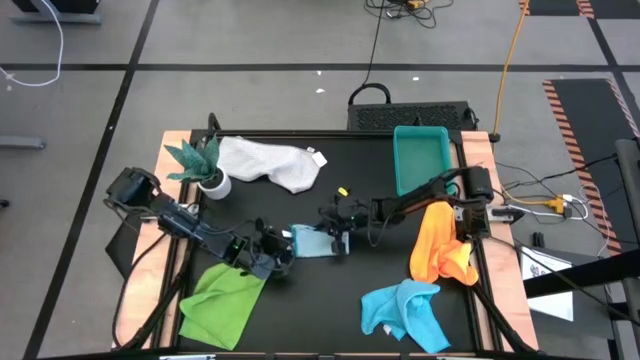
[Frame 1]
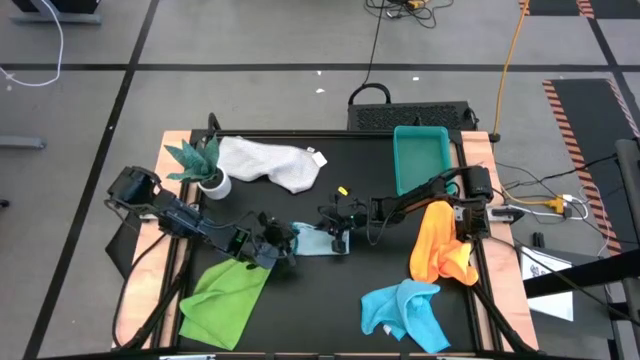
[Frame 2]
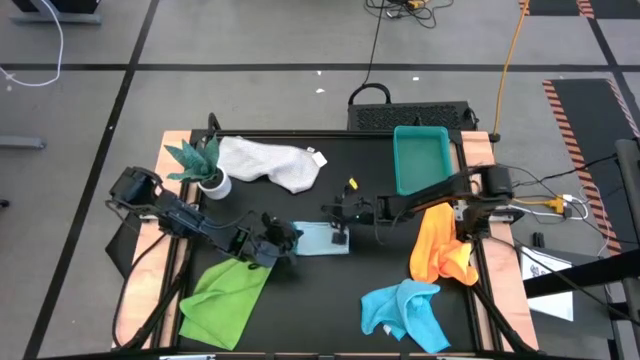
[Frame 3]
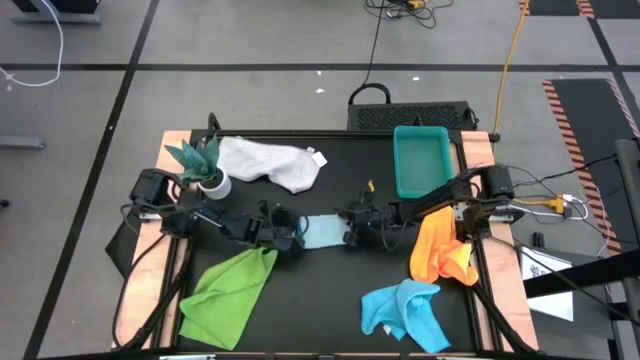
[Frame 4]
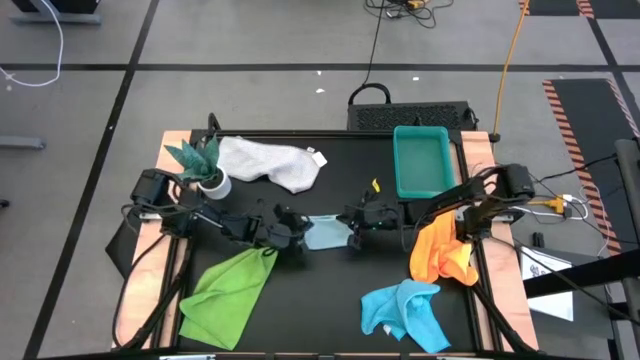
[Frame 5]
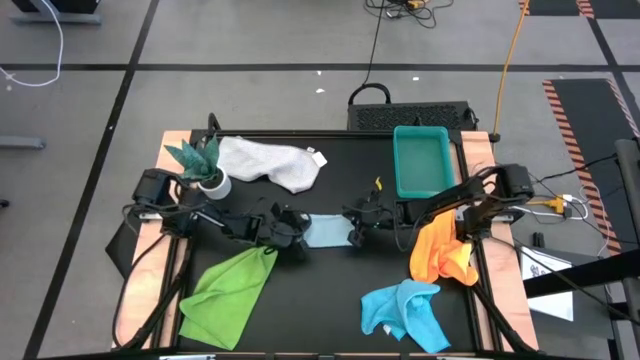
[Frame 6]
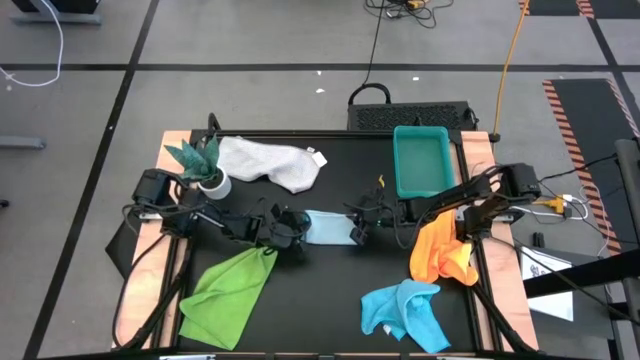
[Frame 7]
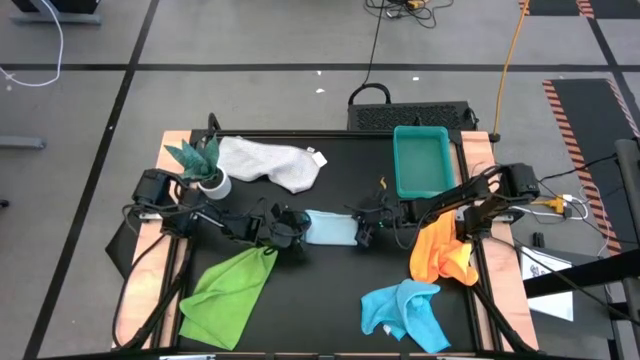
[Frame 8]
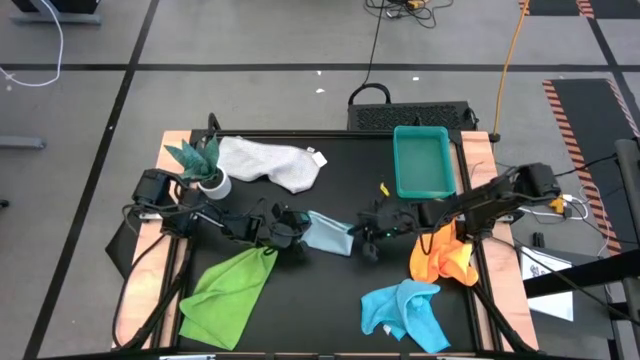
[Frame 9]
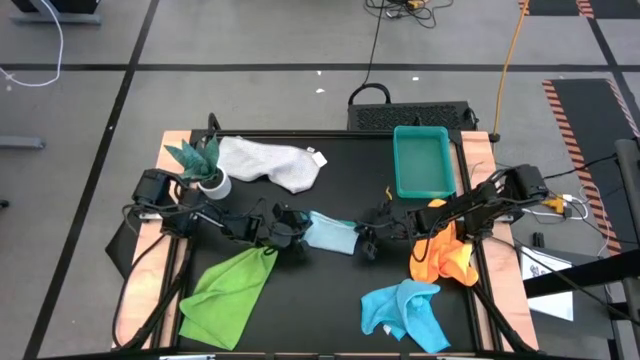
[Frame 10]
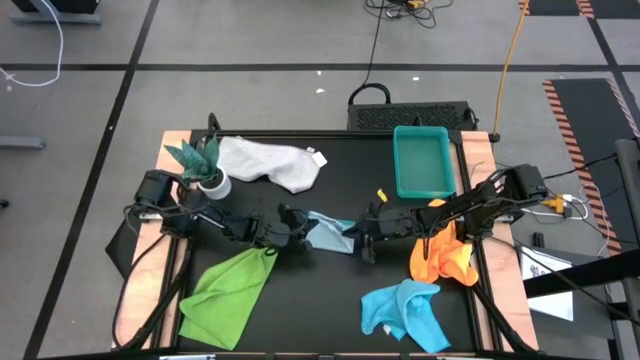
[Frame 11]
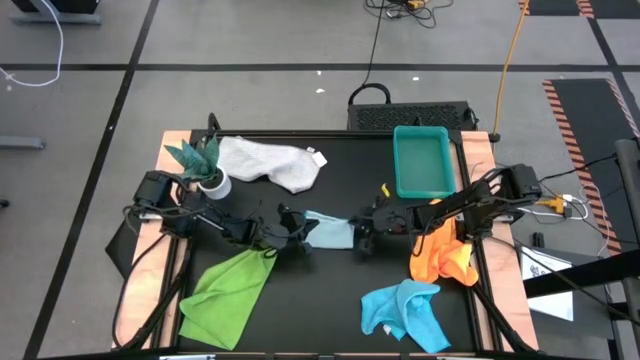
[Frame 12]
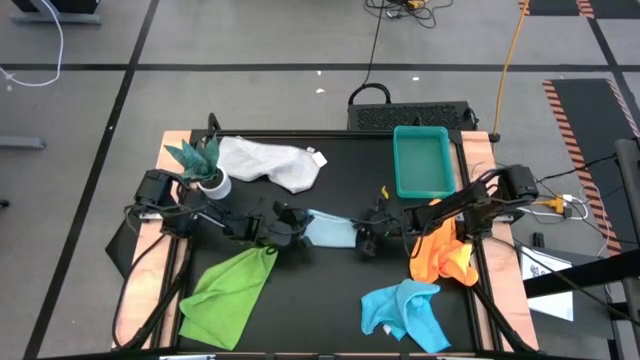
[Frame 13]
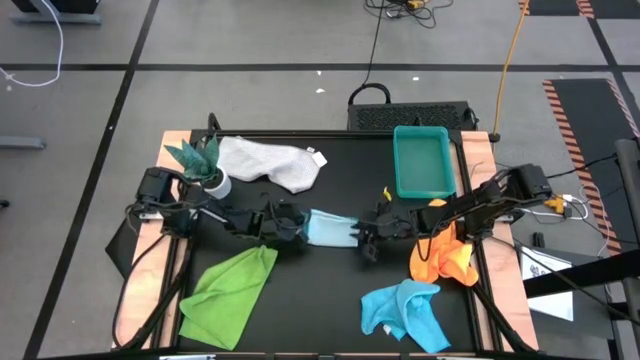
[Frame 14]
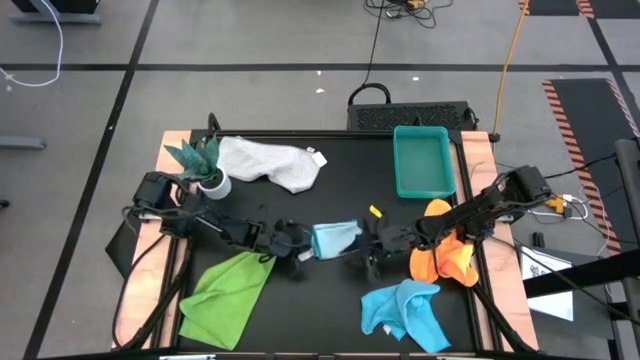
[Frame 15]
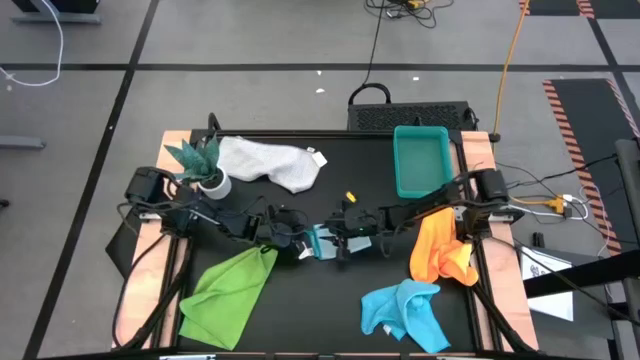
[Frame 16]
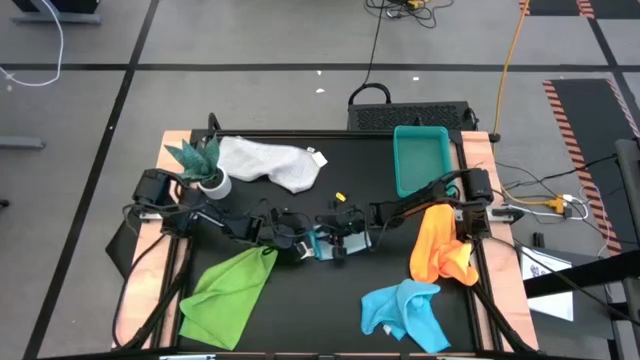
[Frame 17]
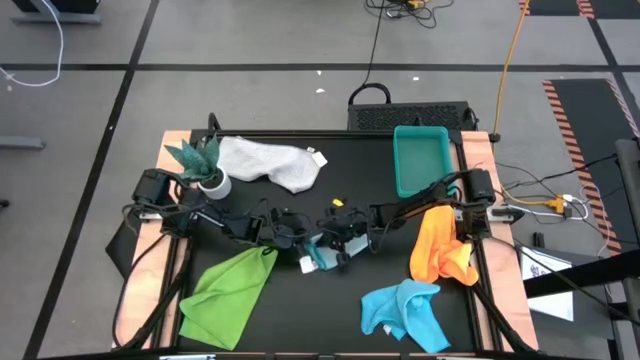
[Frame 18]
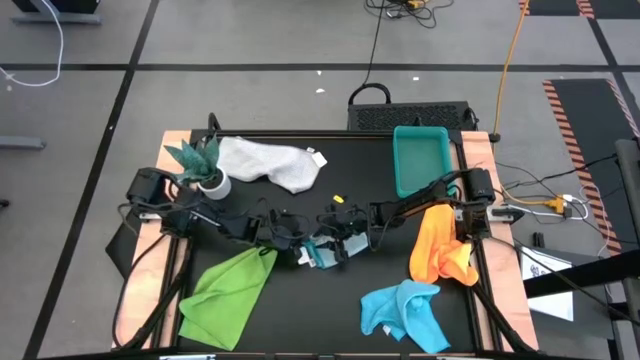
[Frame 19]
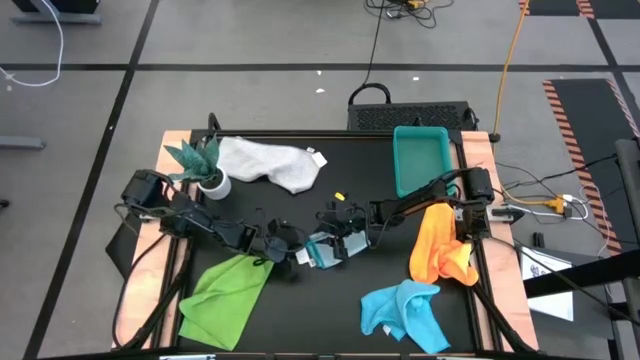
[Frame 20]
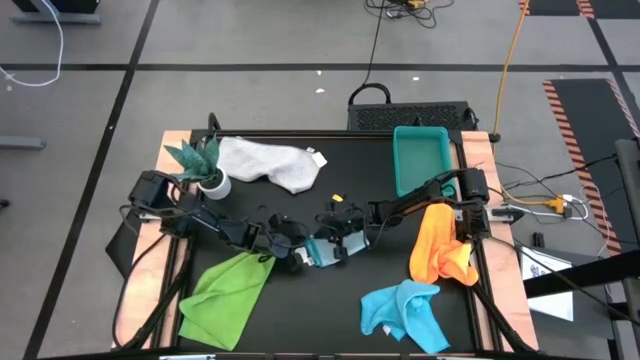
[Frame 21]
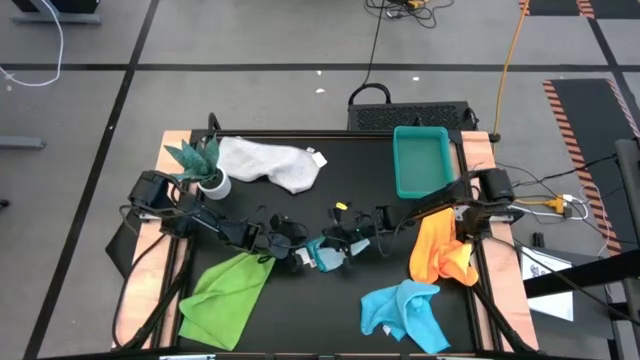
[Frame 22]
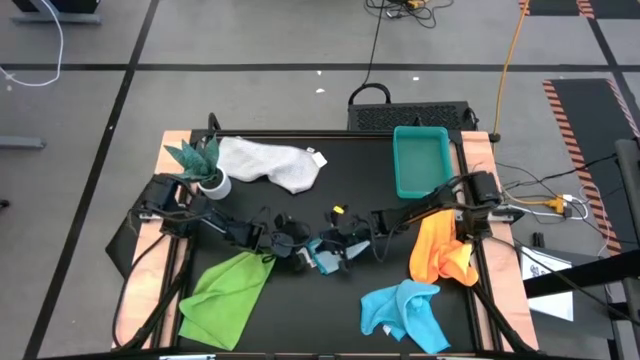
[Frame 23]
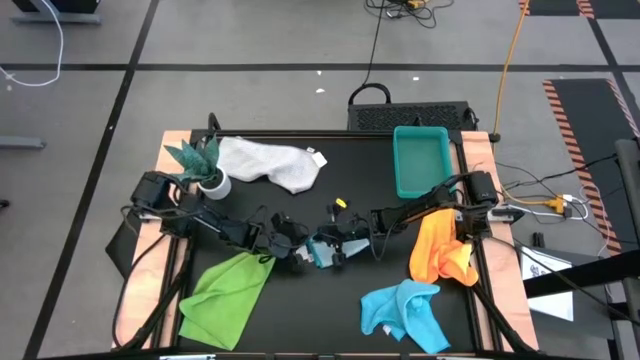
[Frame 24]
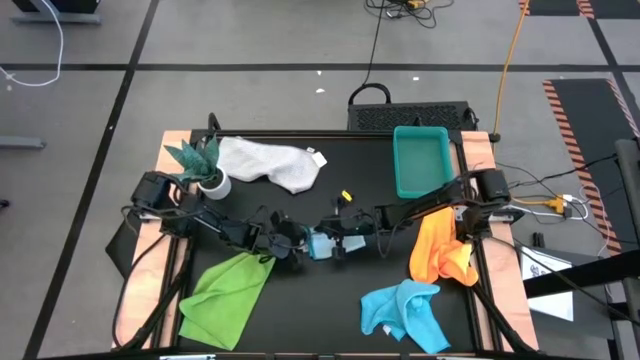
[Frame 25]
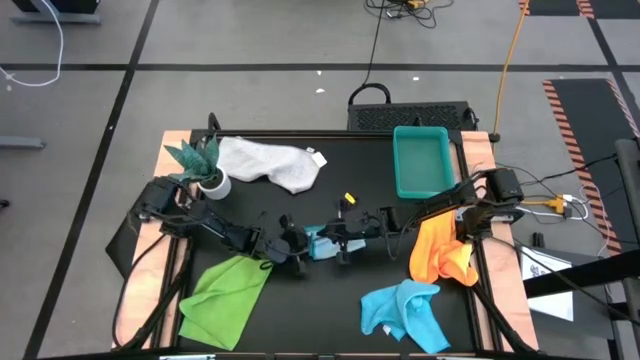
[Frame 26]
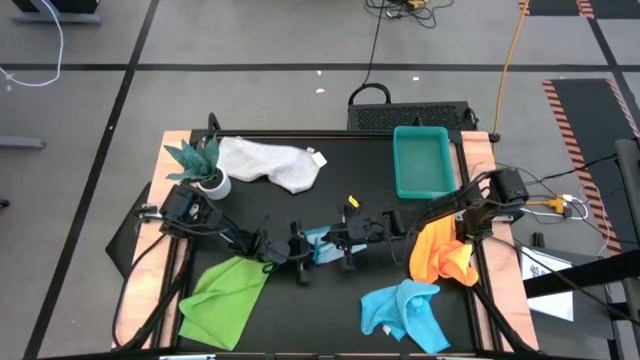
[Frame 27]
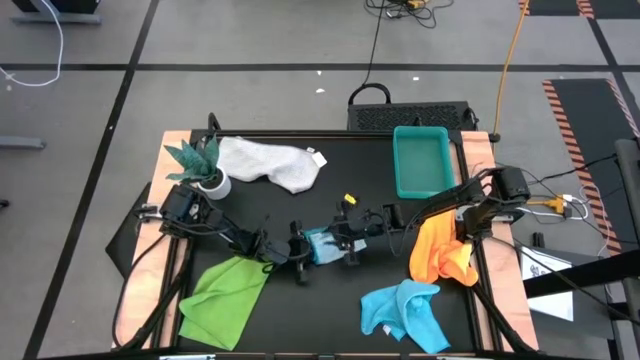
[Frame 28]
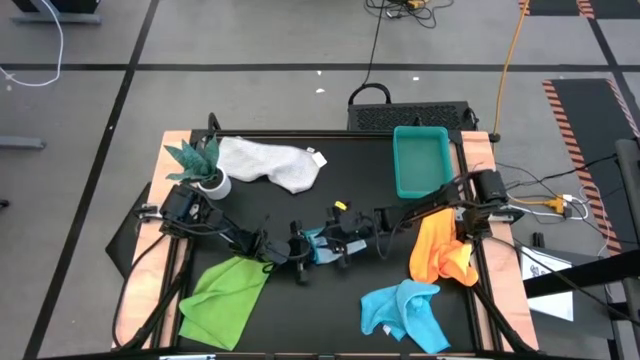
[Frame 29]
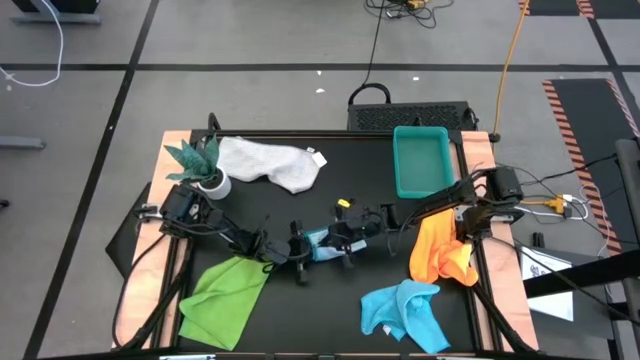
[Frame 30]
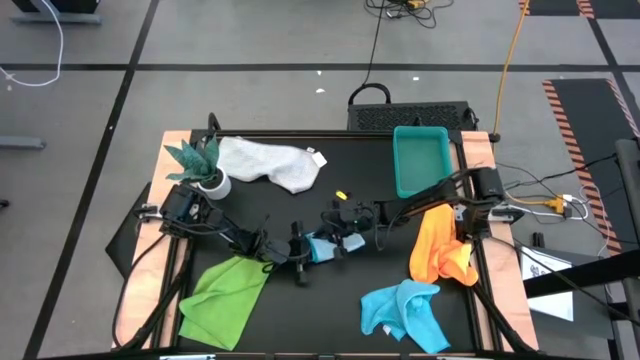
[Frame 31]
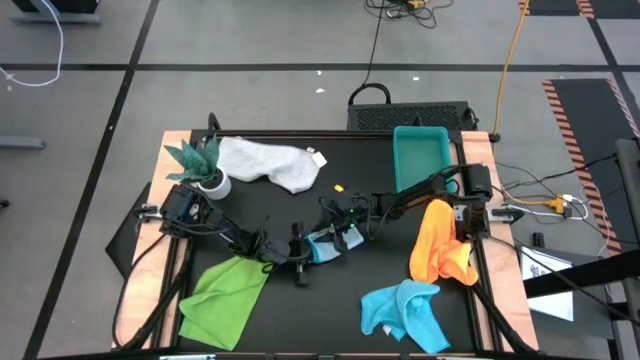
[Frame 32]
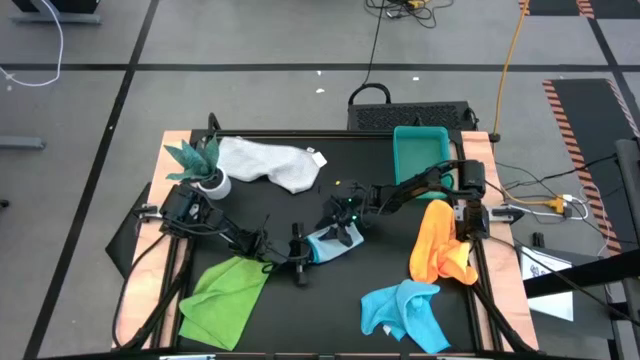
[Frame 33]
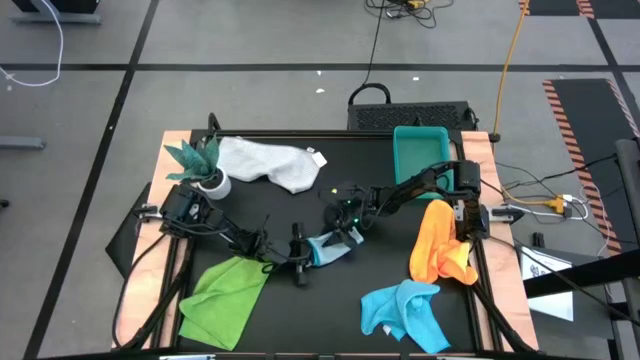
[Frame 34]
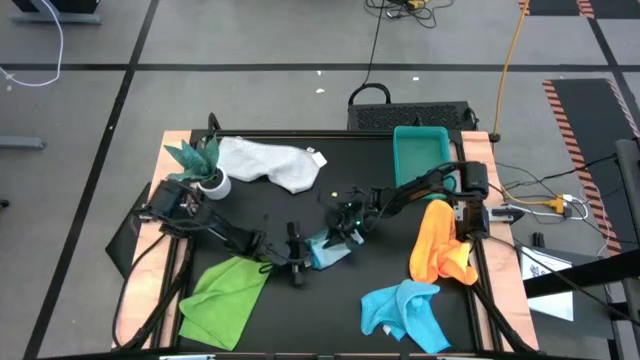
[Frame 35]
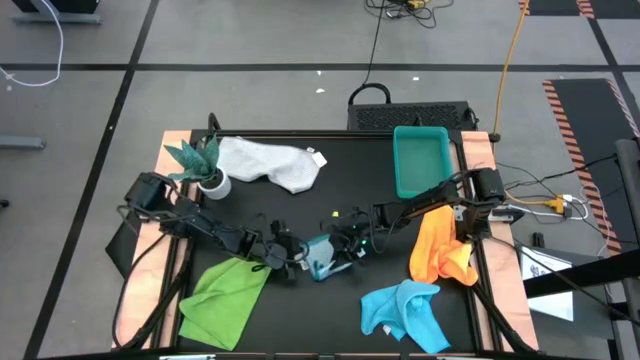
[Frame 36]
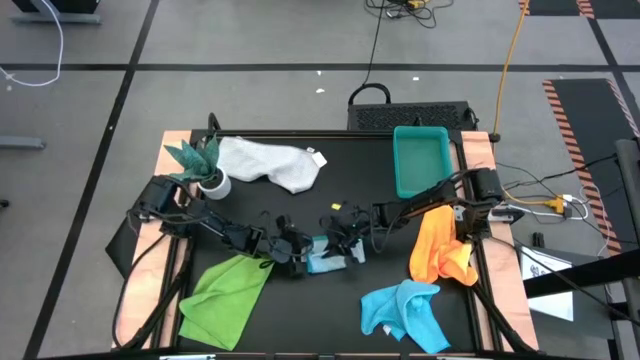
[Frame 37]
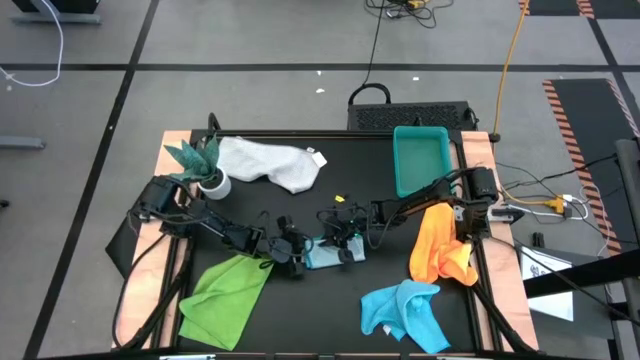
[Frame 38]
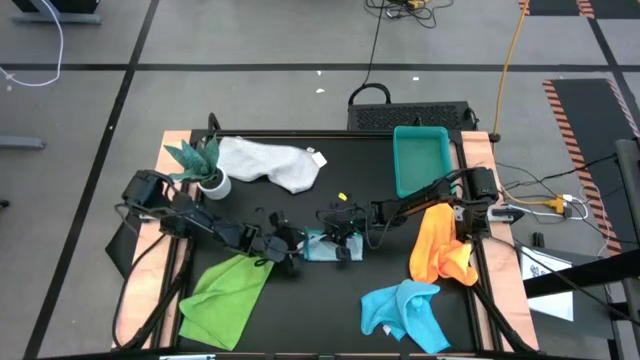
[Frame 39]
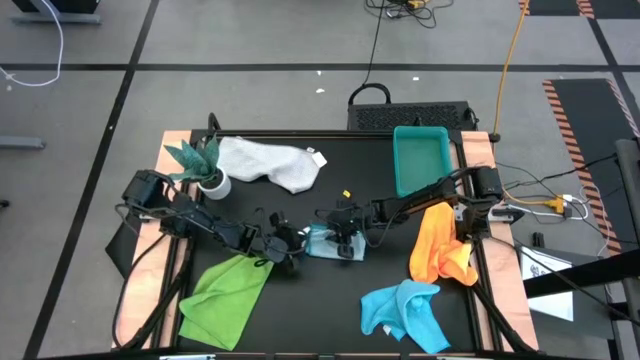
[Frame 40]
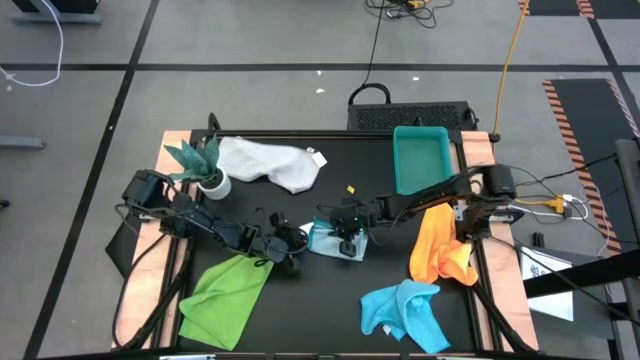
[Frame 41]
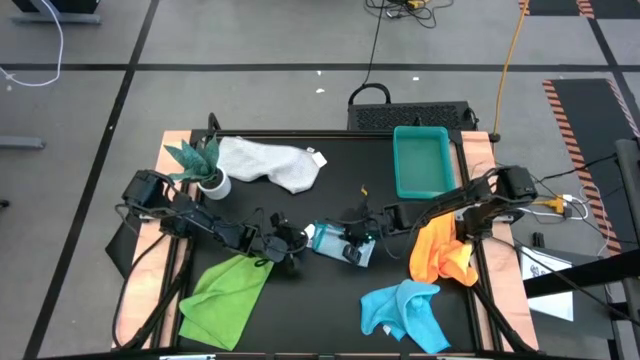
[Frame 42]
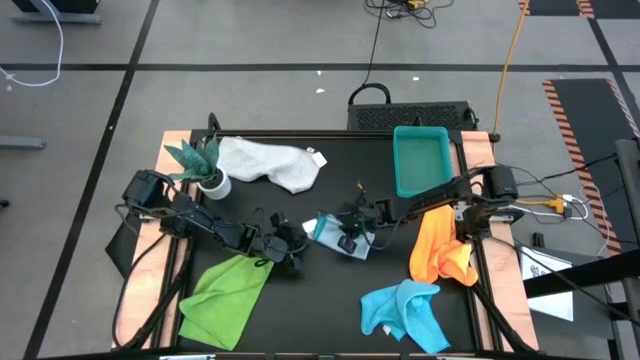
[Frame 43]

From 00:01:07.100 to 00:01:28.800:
Task: Fold microfiber towels
Fold the light blue microfiber cloth
